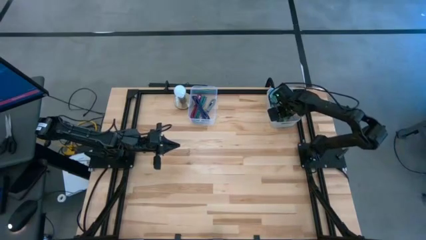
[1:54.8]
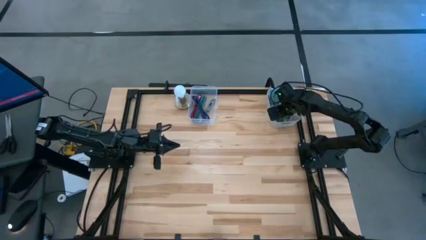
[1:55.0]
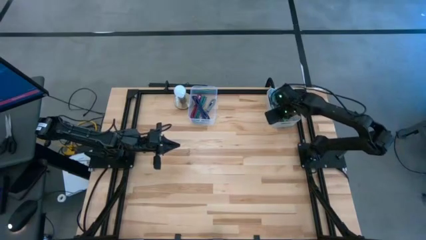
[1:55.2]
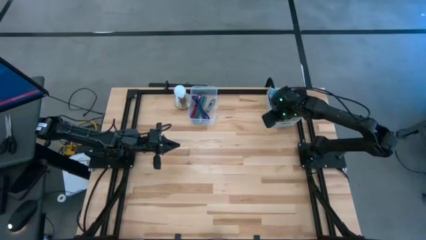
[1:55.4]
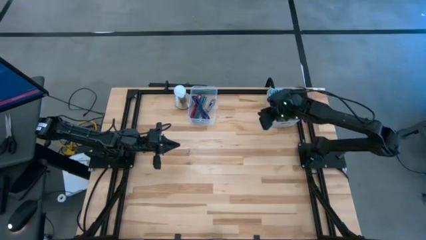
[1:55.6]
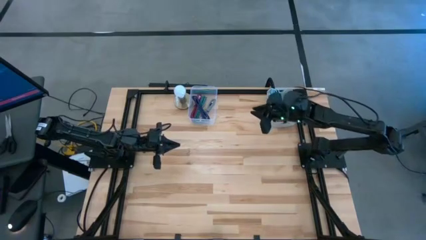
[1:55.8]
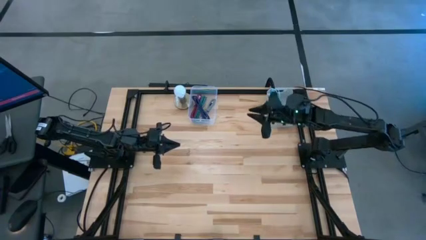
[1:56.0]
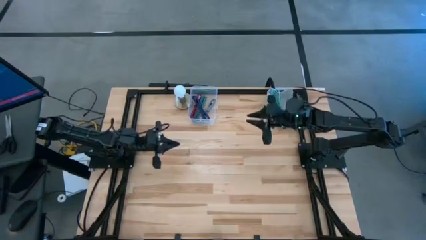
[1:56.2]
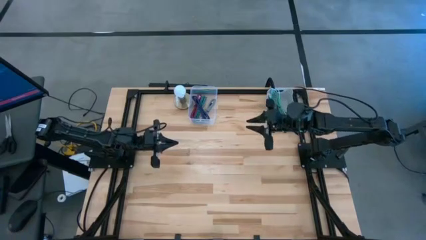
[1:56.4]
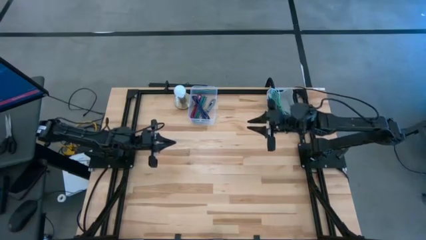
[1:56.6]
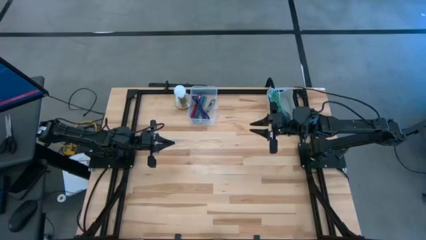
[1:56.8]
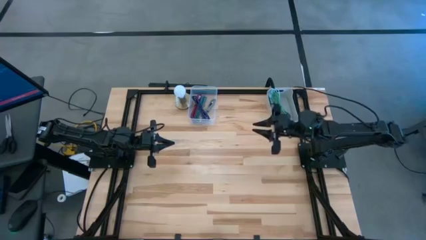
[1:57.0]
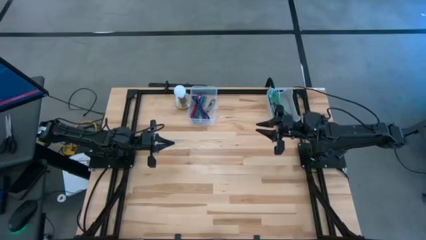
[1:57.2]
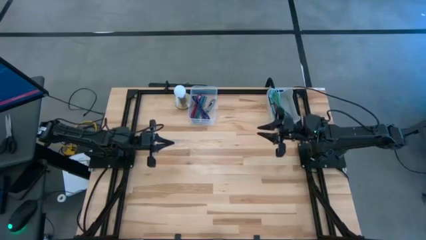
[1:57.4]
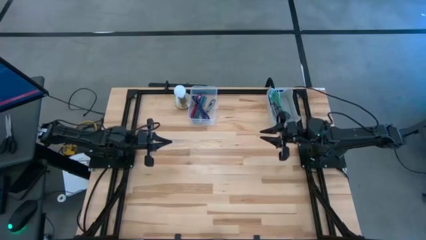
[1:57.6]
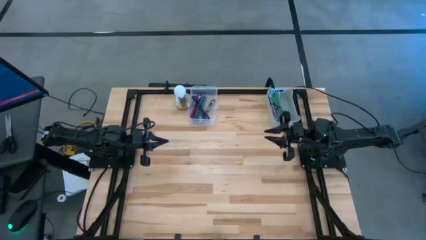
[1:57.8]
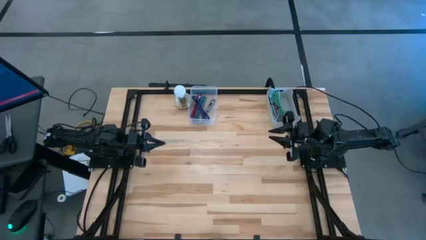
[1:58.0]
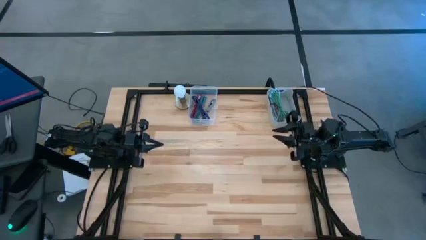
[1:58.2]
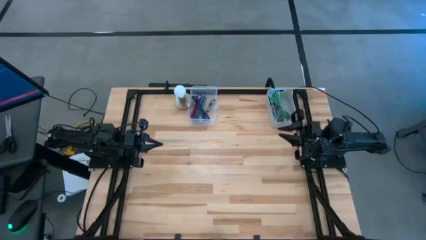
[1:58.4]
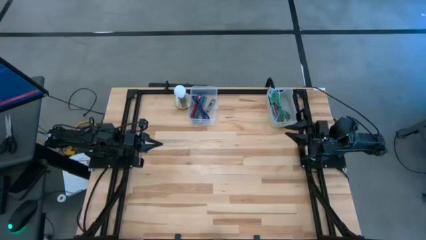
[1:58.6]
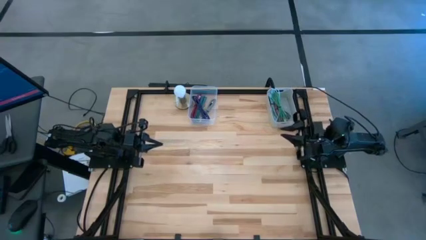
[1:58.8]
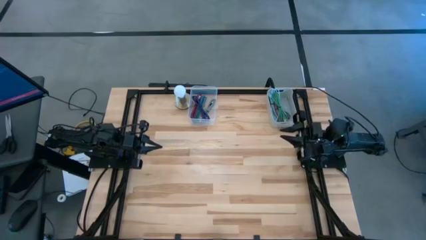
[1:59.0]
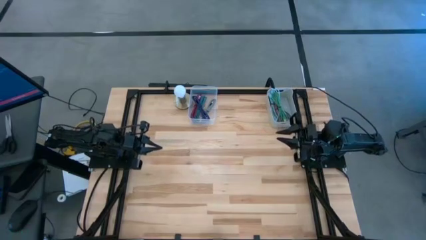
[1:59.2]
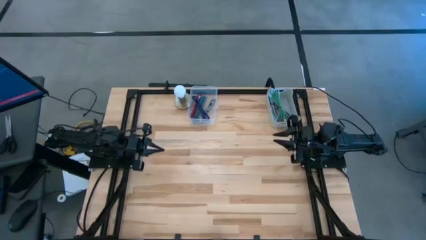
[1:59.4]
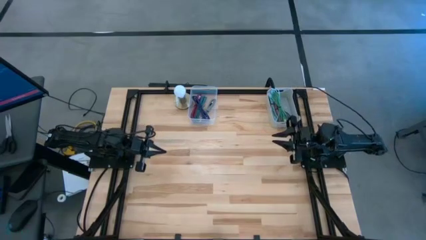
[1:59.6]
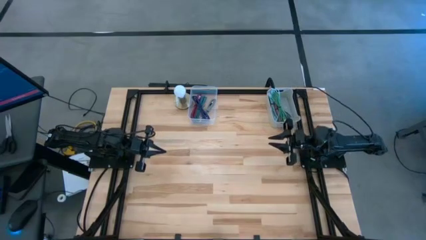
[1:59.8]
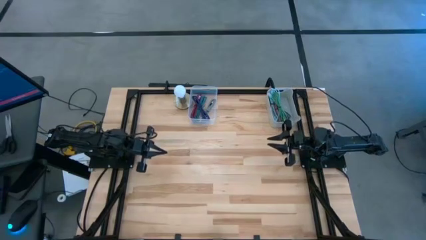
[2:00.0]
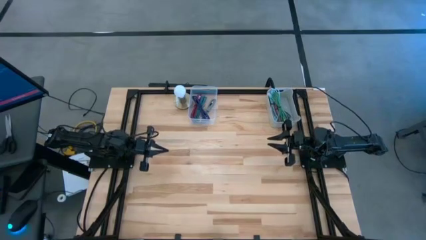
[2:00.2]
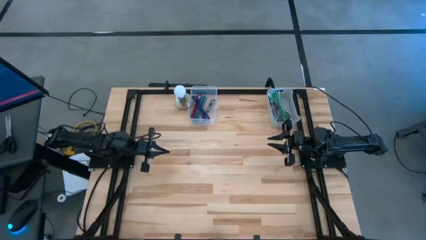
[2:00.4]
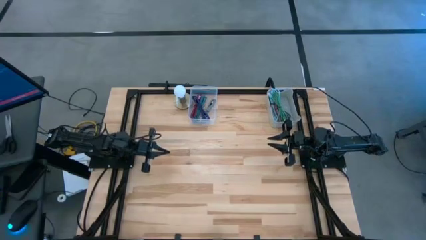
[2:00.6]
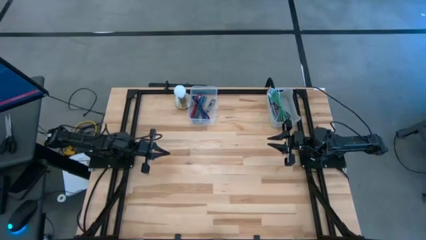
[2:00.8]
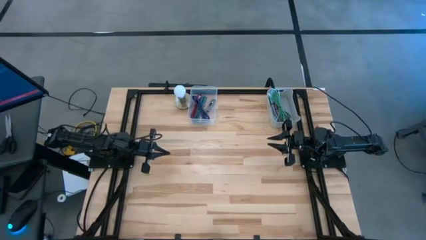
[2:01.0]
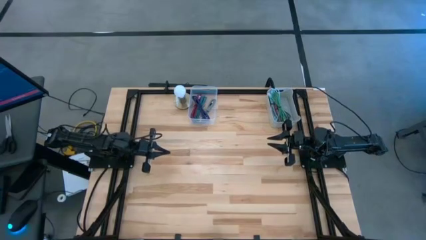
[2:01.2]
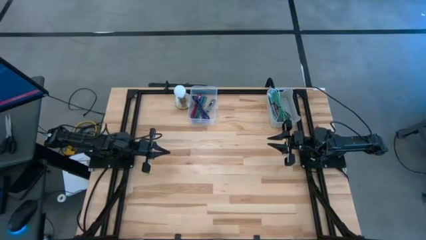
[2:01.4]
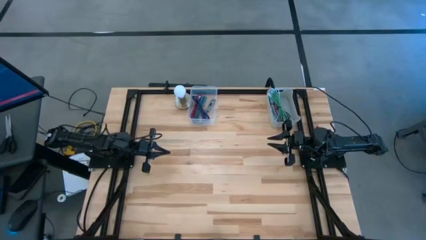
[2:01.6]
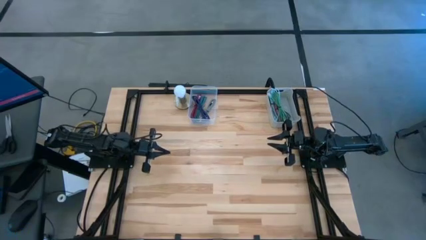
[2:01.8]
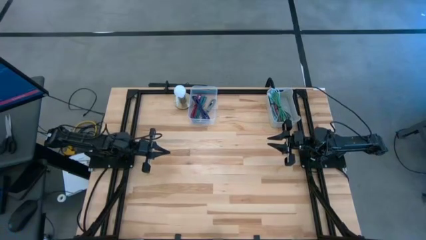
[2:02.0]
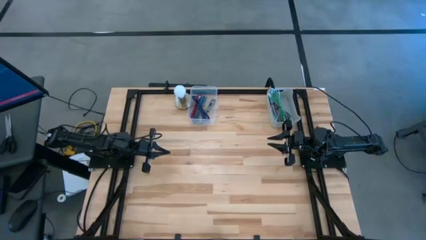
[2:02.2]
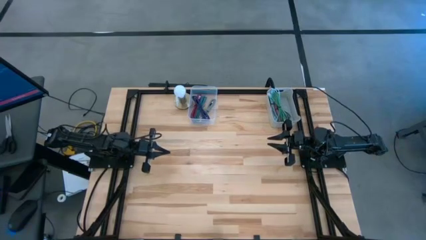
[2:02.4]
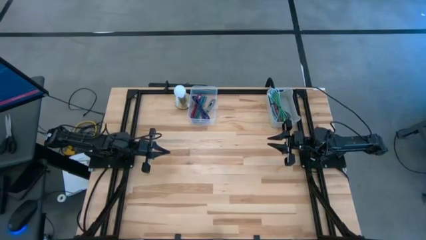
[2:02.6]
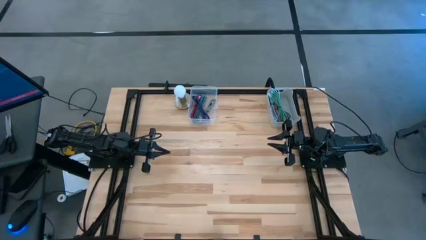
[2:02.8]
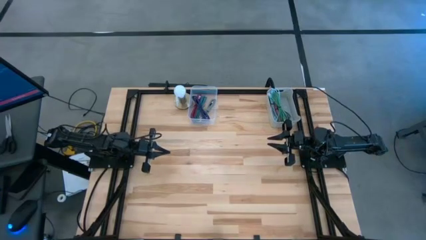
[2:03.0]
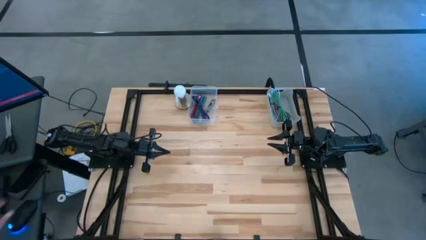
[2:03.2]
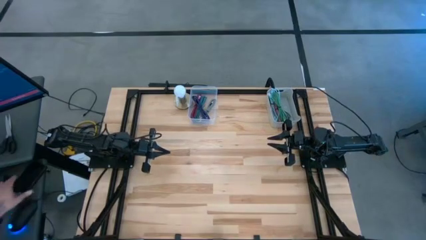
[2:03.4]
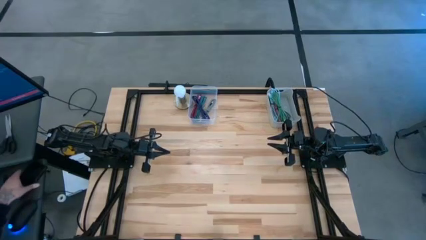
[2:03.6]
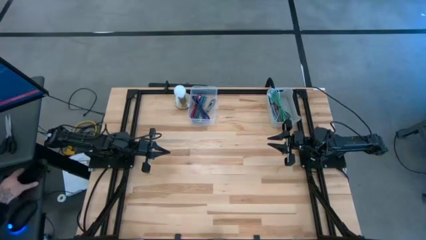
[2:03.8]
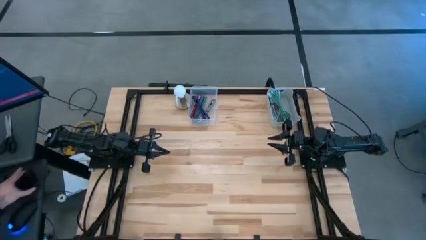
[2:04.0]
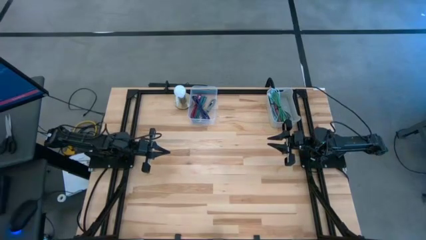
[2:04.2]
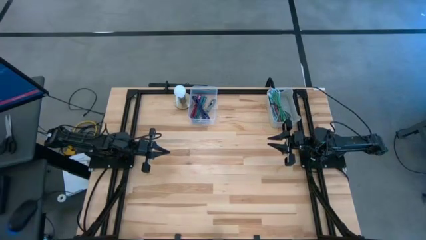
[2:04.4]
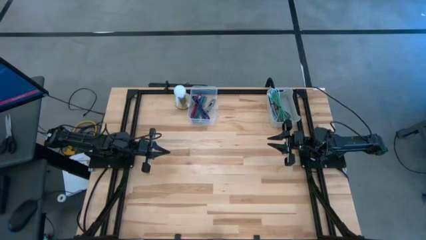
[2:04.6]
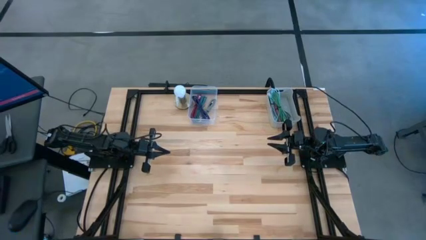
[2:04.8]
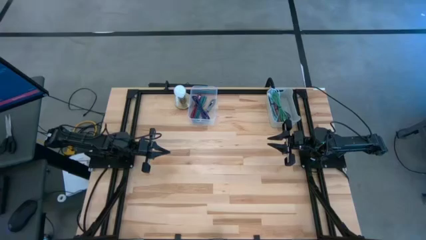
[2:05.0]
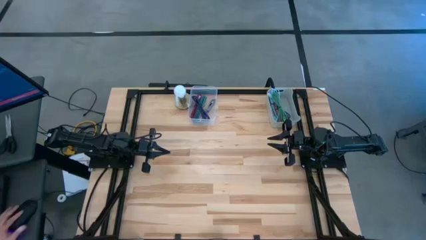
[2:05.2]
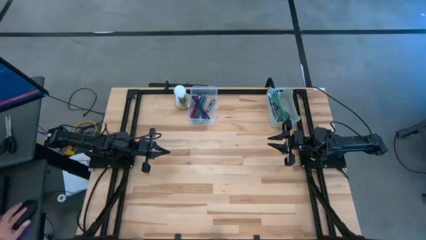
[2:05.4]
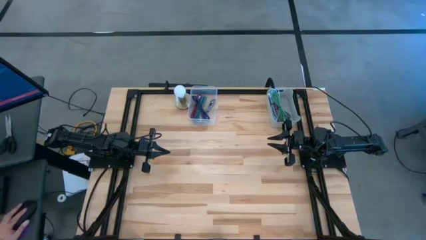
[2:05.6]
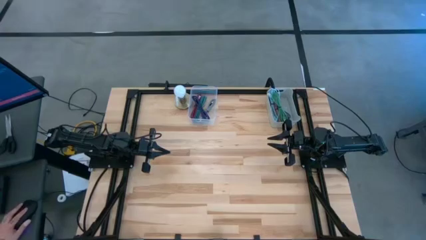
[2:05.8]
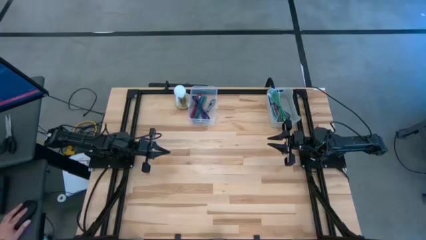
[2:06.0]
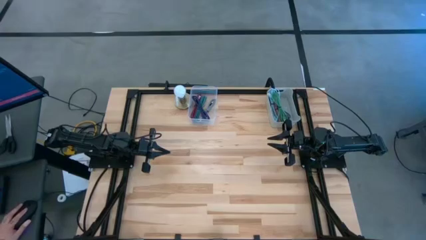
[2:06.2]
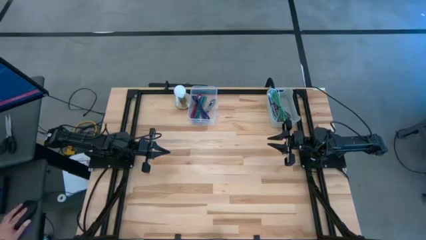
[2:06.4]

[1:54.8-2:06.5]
Task: Pick & Place USB Port
Return to Home Position

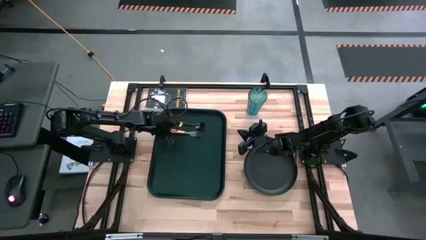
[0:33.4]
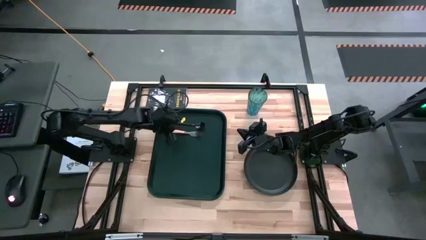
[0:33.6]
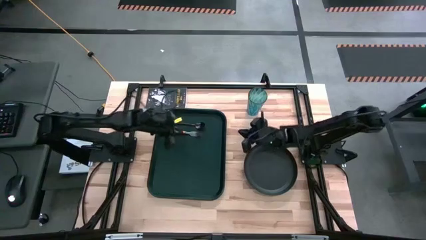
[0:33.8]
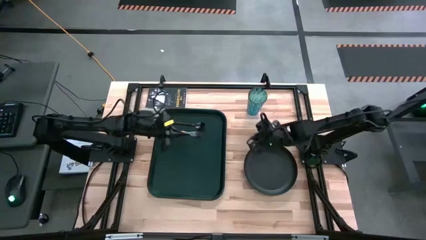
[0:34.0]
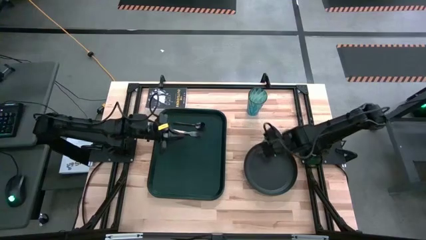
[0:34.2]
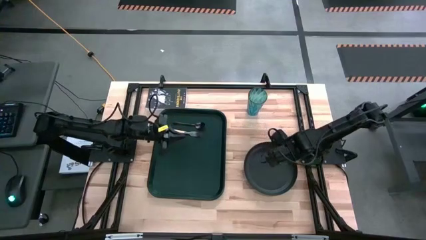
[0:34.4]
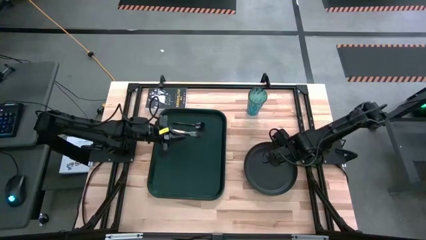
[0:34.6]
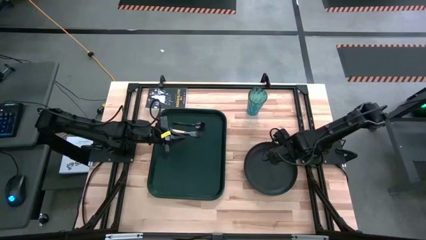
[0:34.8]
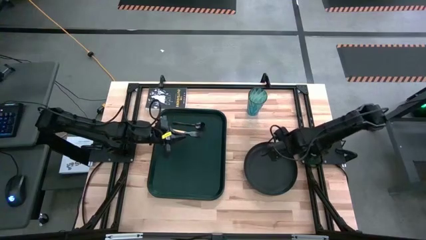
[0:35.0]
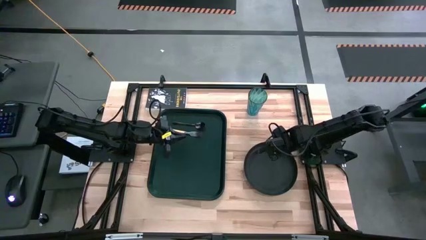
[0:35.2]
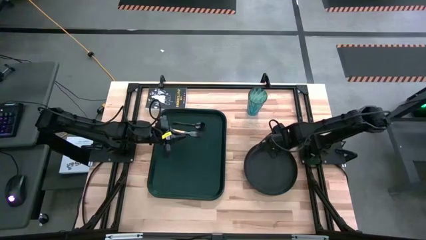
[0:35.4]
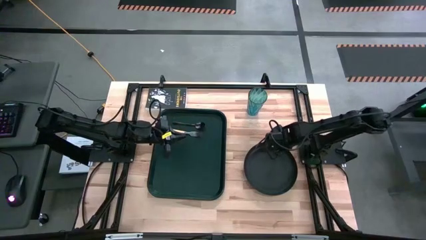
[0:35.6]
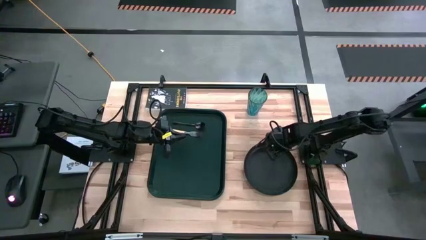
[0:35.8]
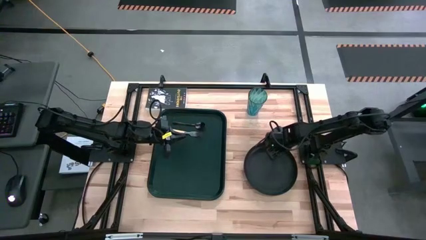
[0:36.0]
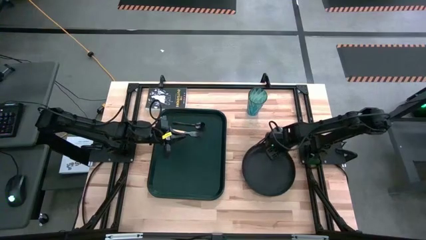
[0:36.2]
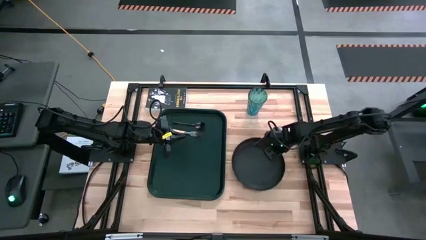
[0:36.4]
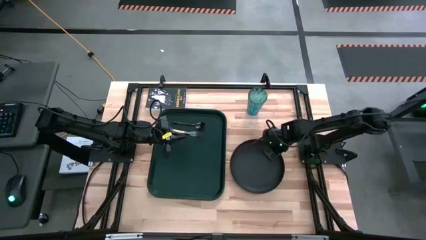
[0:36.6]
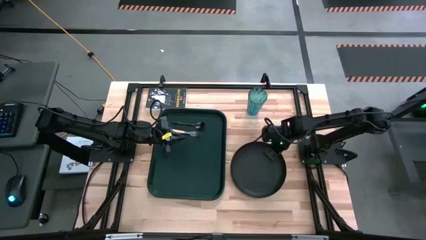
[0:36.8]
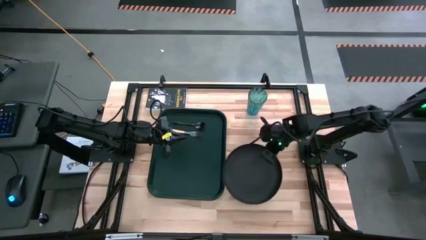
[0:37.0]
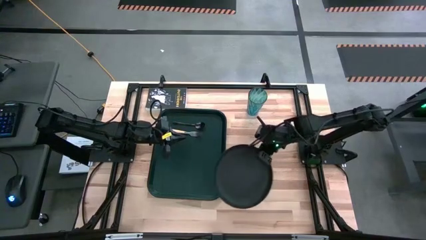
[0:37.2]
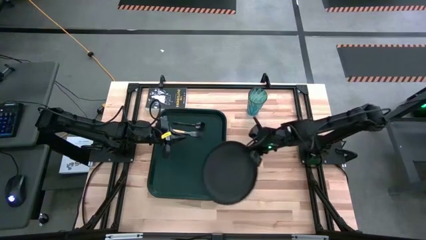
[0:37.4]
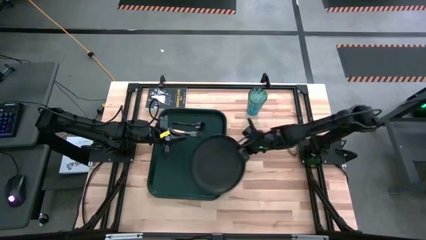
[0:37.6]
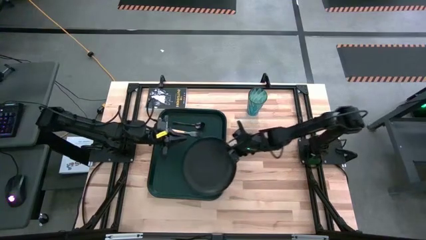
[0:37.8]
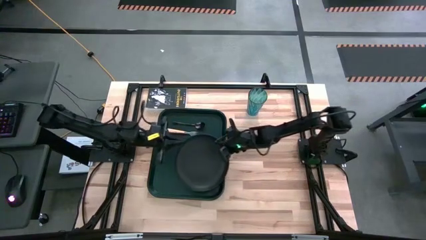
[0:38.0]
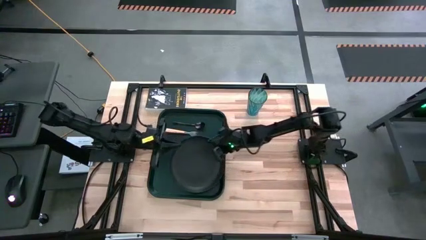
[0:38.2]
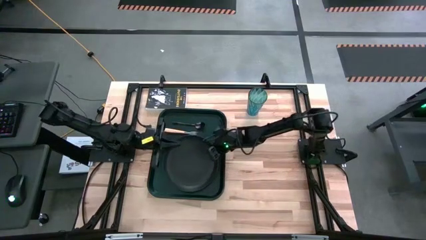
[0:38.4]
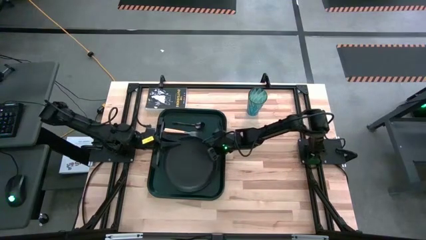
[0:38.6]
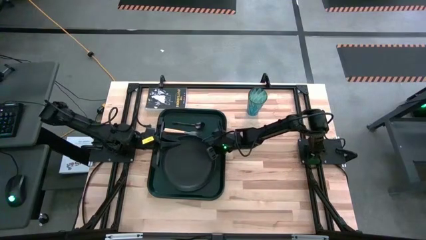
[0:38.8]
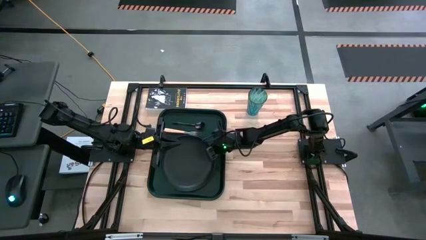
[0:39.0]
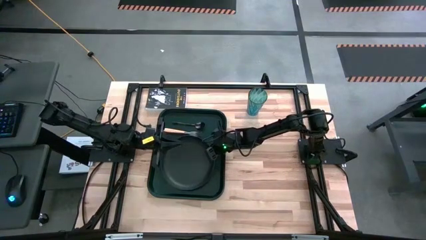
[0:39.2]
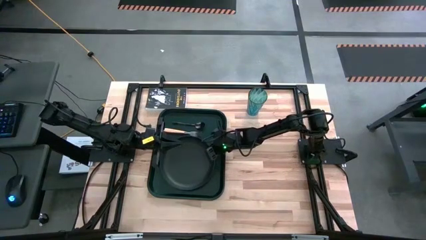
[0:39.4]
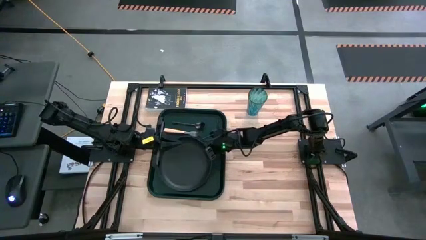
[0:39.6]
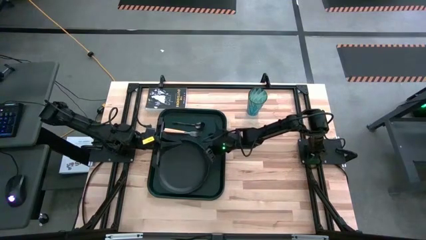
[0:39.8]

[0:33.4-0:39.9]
Task: Pick and place plate/cup/fork/spoon on tray
Put the plate on the tray to the right side of the fork
